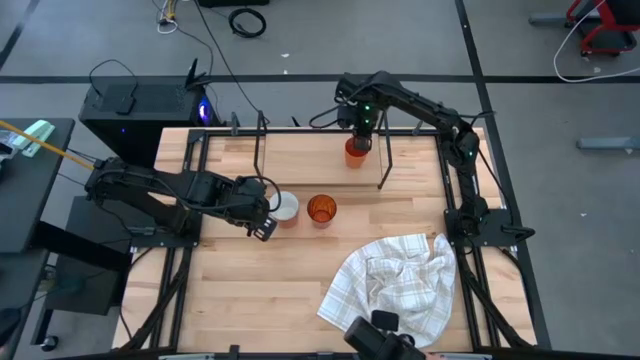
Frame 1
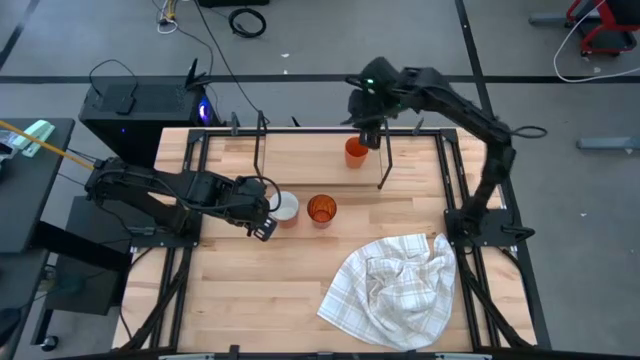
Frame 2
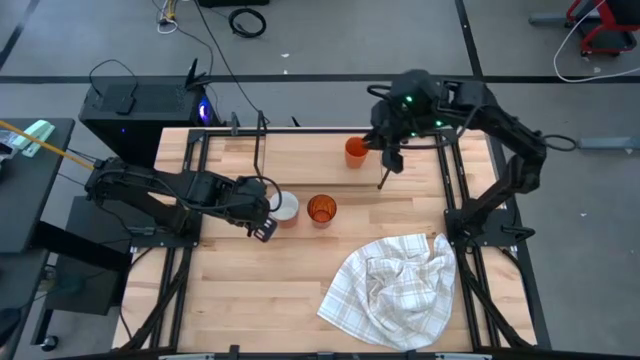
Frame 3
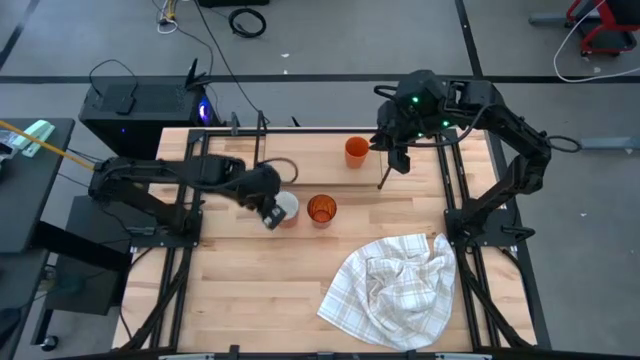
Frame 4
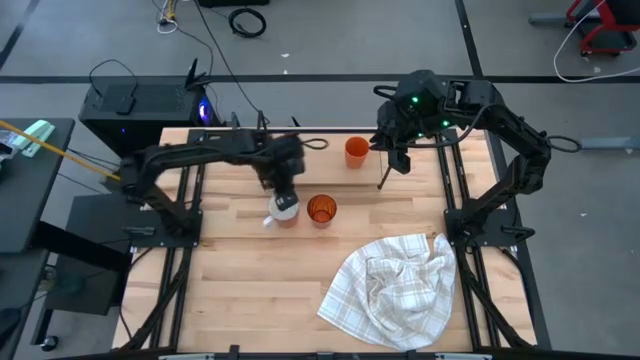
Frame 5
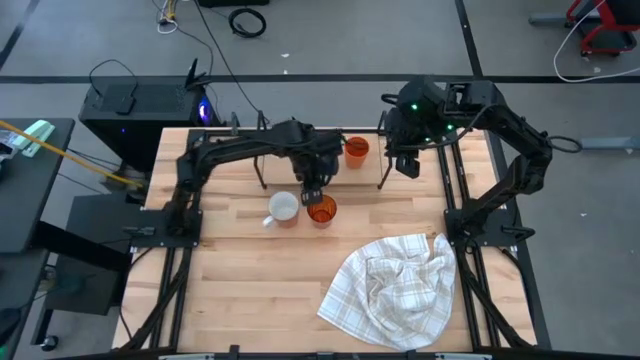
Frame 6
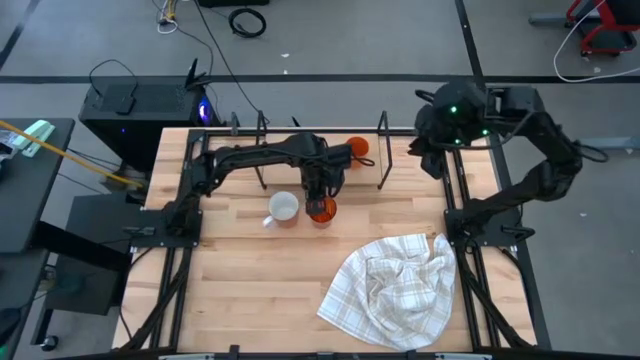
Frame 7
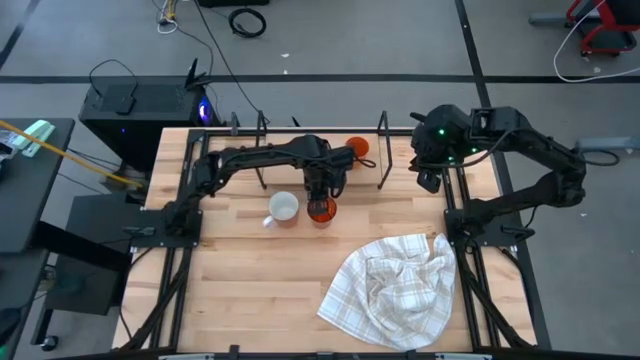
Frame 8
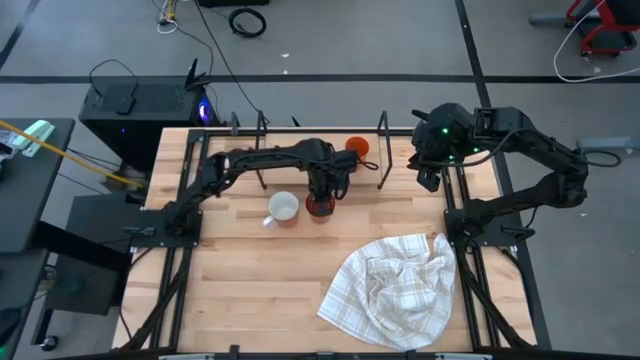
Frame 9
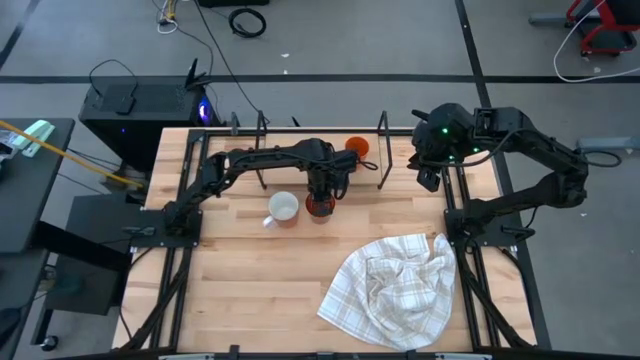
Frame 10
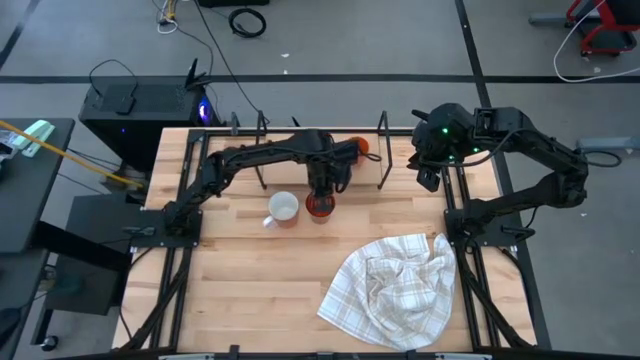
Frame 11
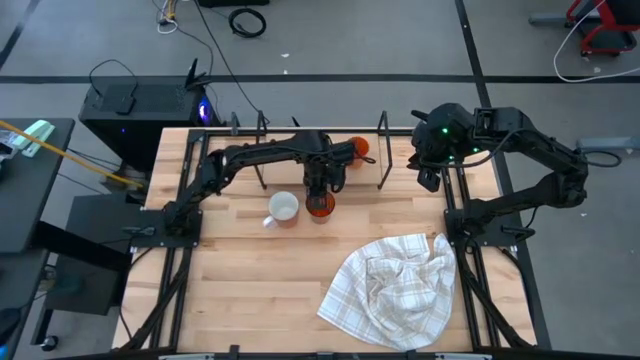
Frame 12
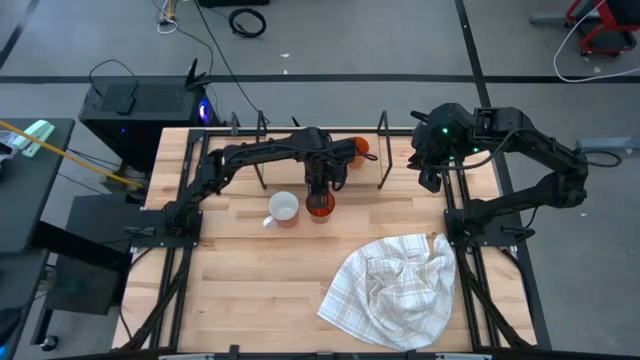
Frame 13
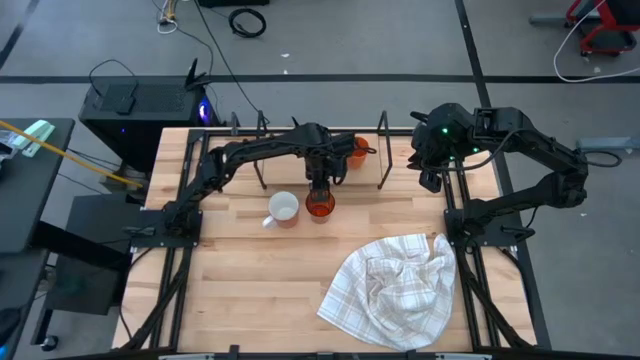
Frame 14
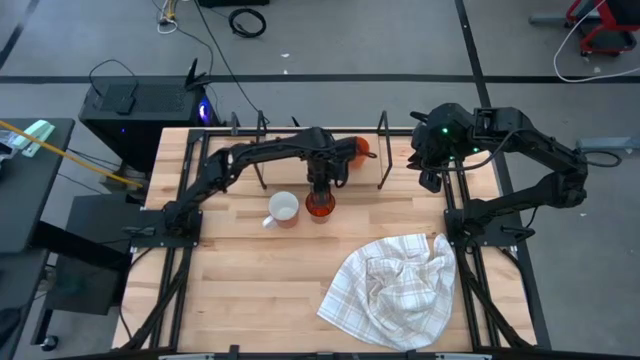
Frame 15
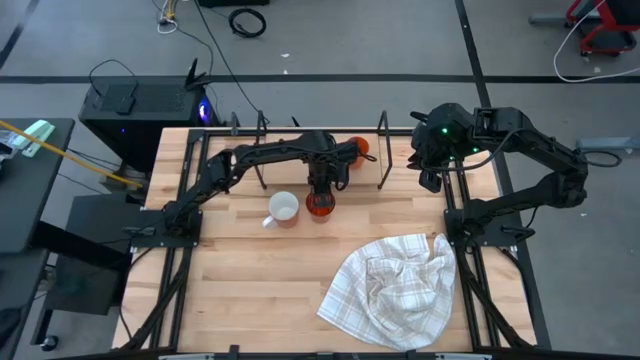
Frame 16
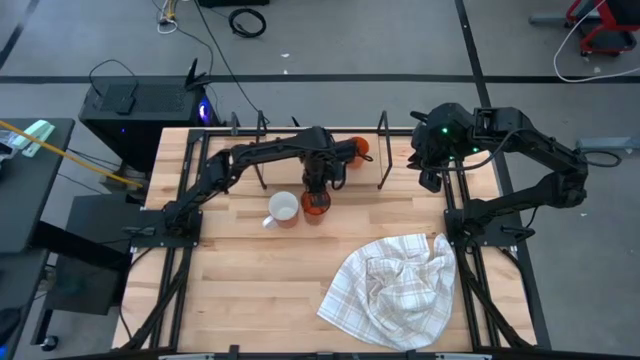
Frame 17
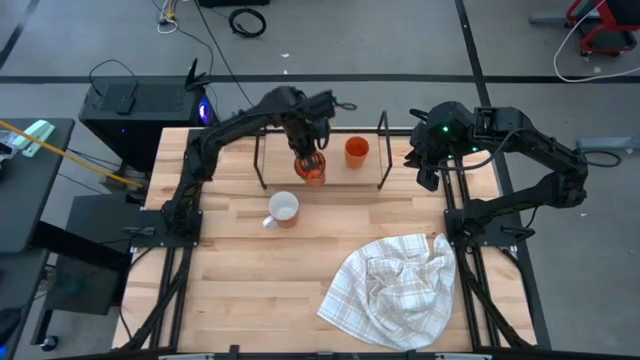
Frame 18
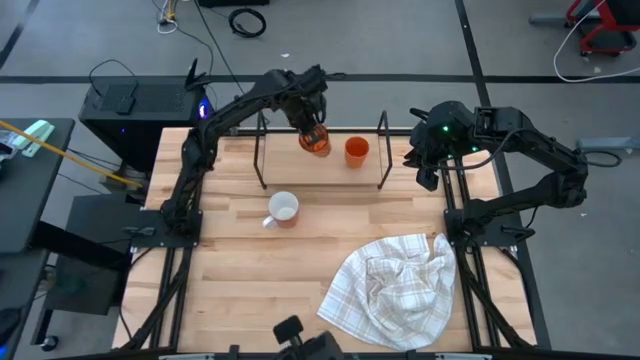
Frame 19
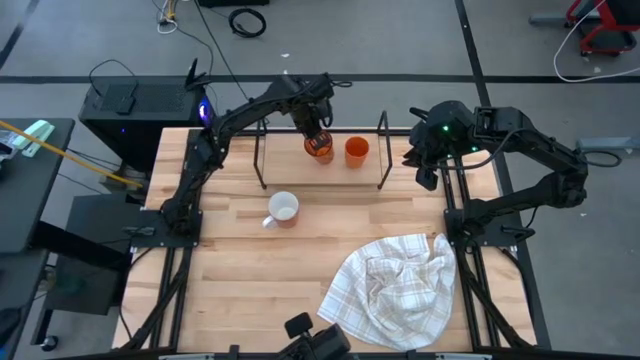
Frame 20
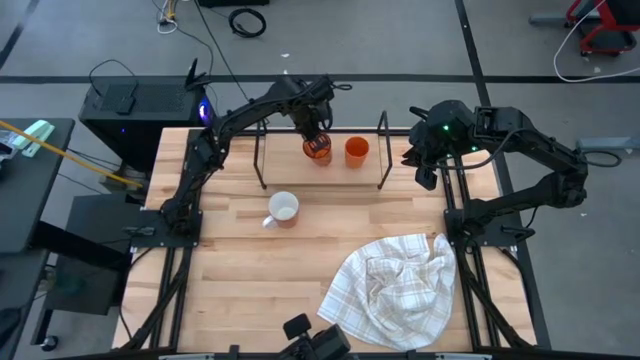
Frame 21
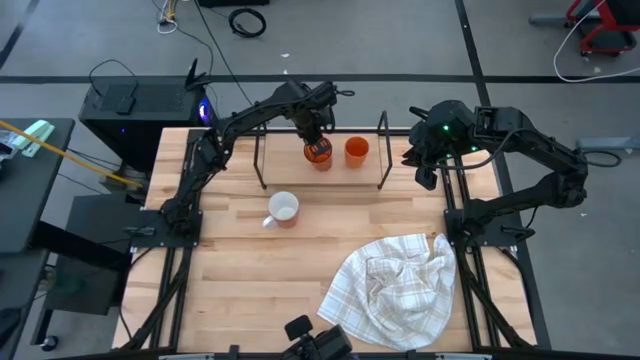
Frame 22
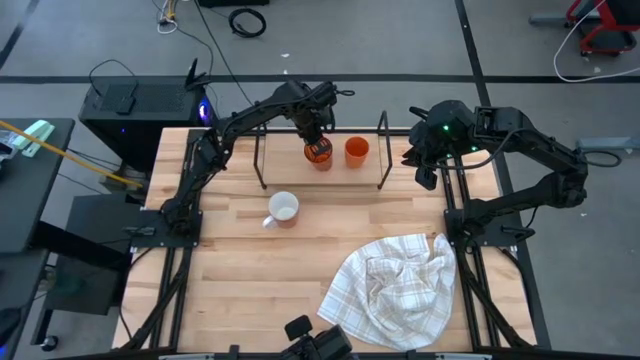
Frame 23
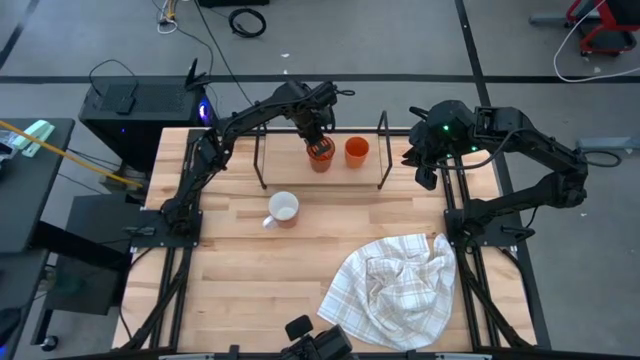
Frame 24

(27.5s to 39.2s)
Task: Stack small to large cups/mugs on shelf
Put the orange cup on the shelf

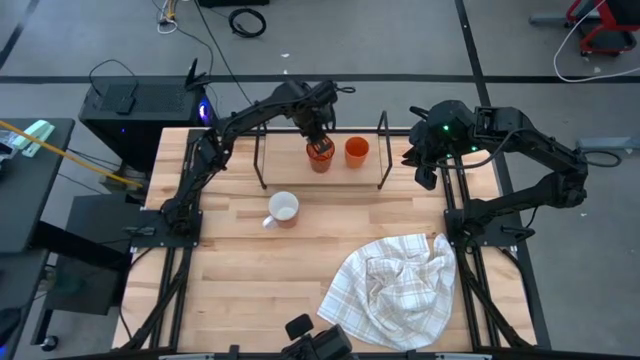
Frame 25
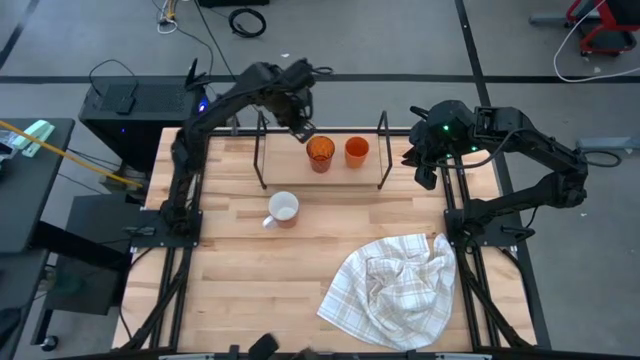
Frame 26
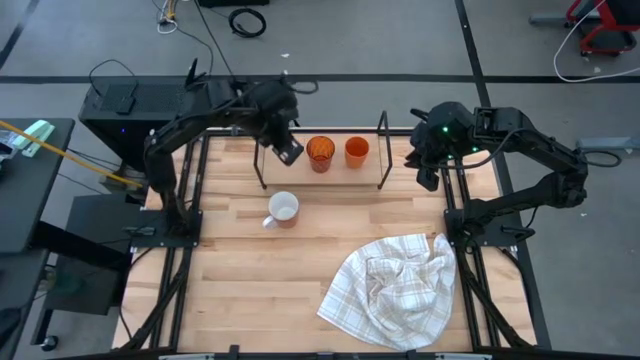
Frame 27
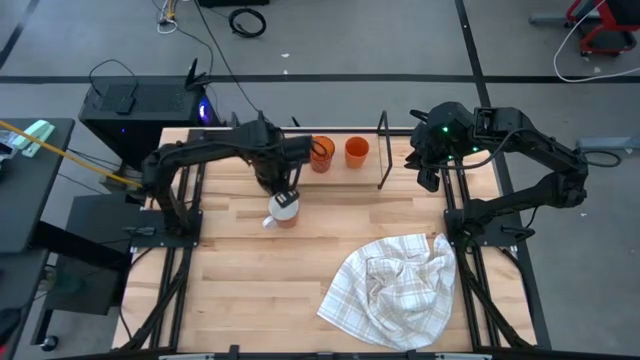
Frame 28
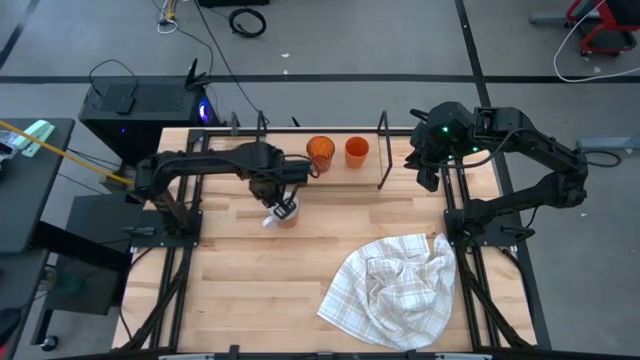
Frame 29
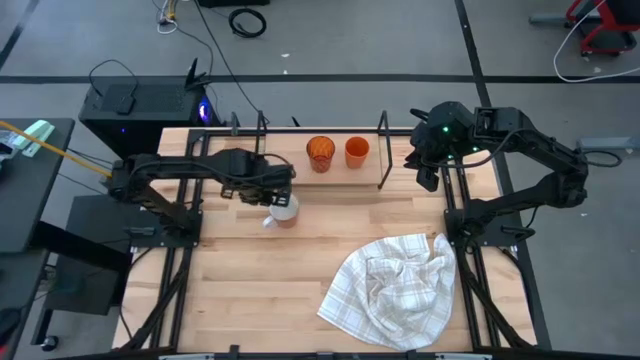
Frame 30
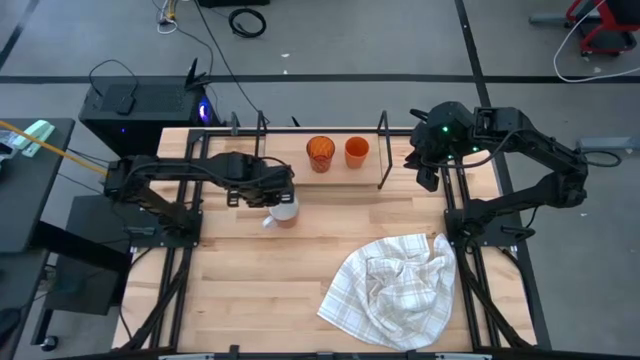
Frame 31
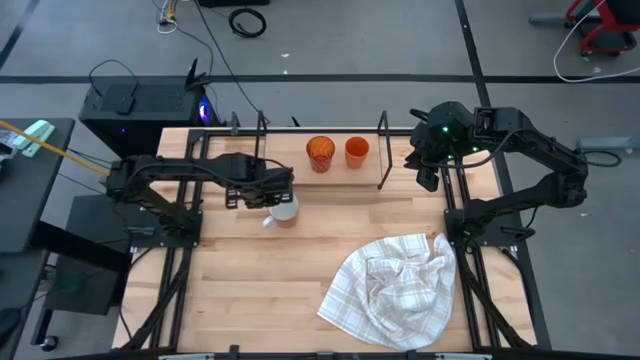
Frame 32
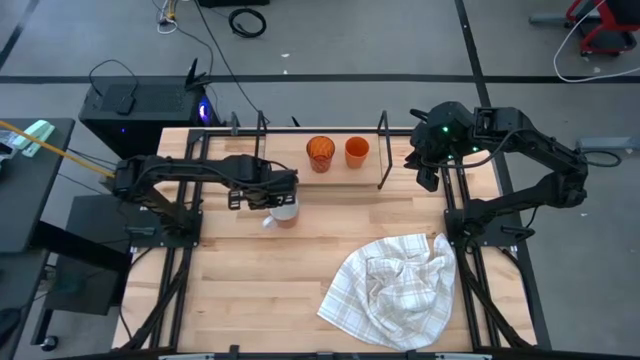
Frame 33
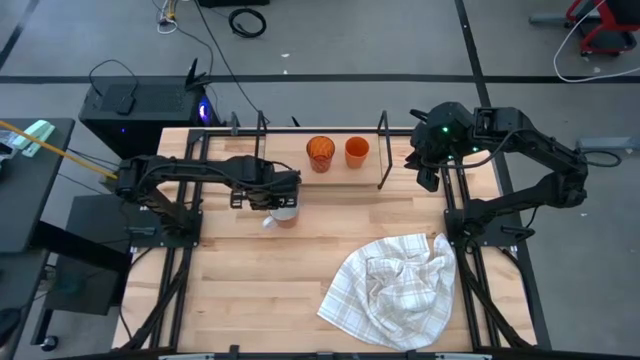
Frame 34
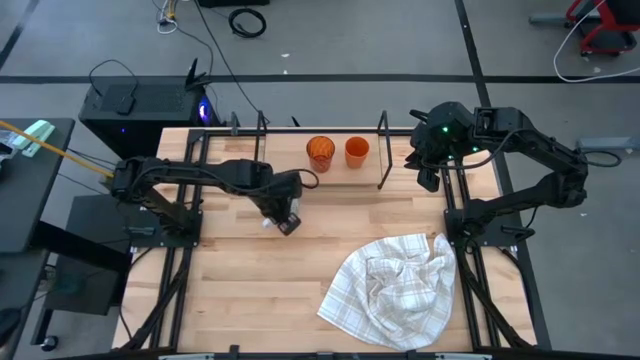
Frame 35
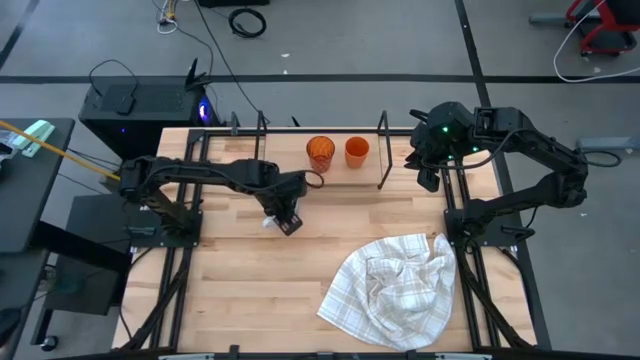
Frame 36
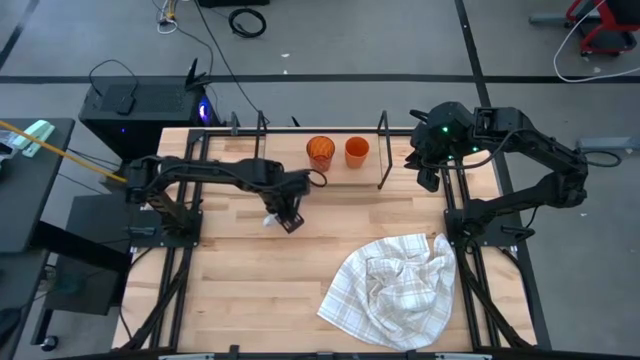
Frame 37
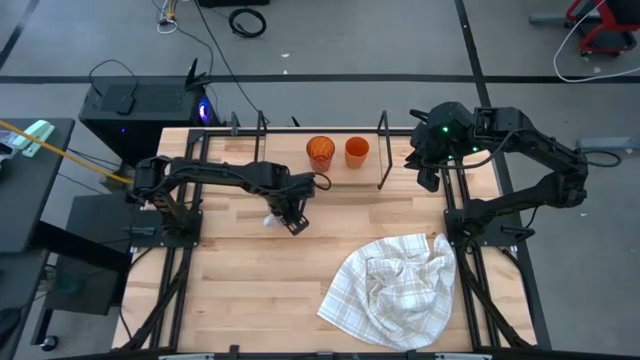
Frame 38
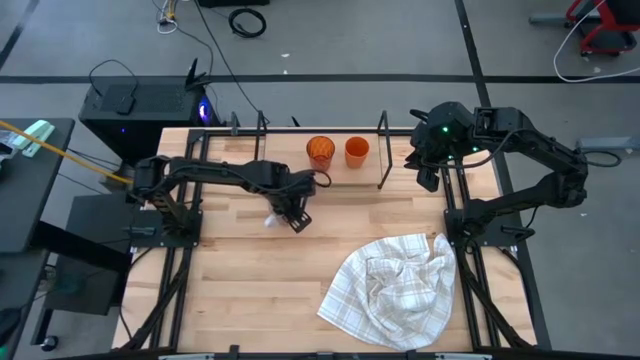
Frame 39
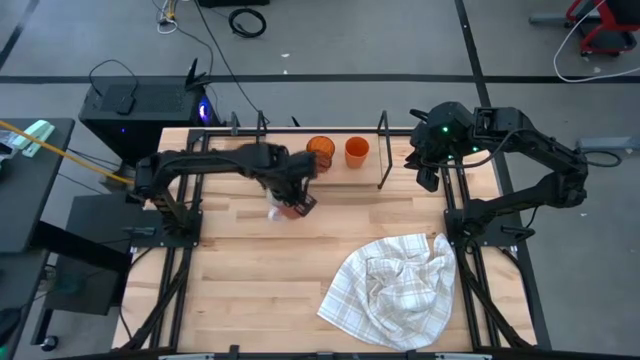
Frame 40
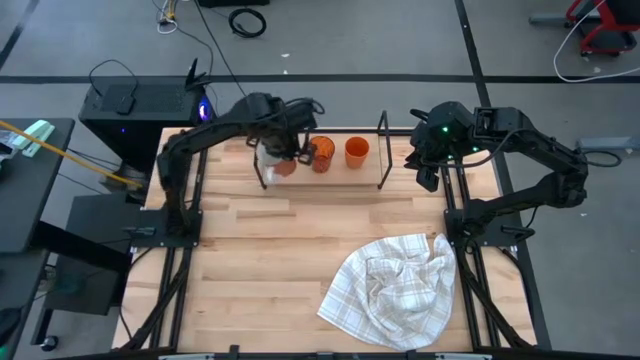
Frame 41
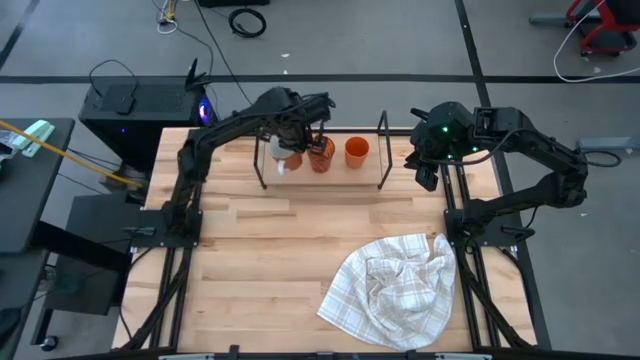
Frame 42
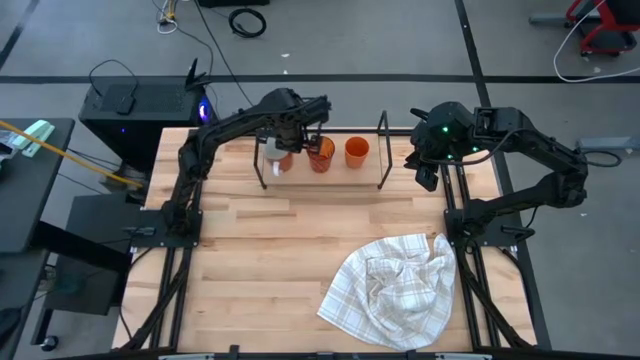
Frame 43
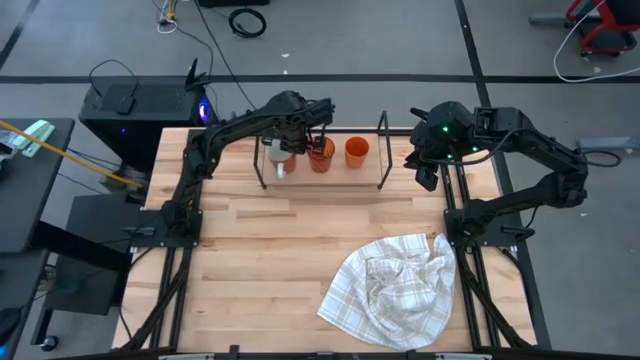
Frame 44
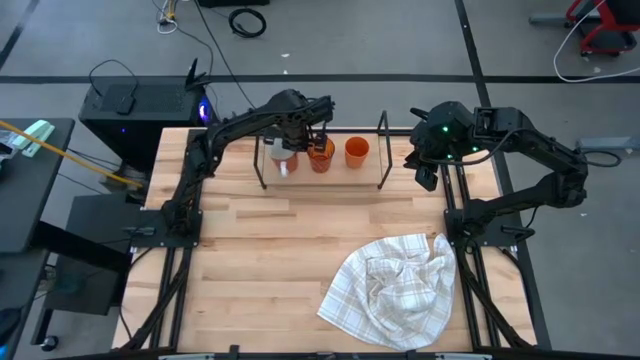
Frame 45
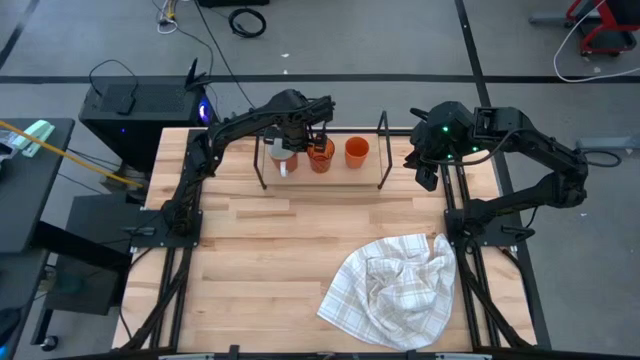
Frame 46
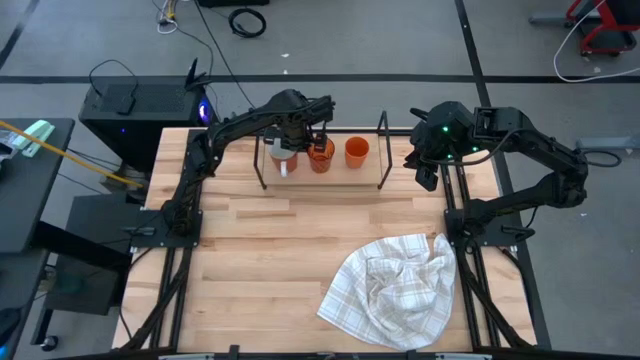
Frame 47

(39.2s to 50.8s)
Put the orange mug on the shelf
